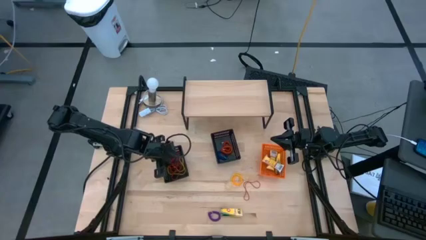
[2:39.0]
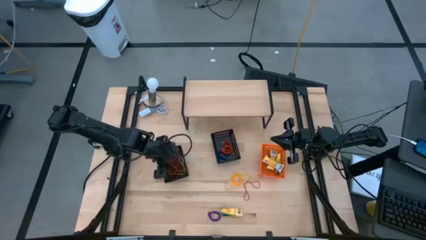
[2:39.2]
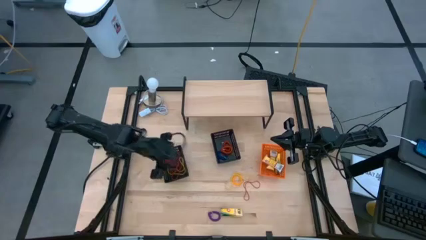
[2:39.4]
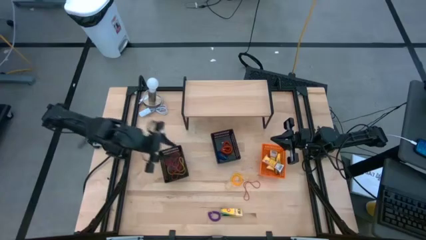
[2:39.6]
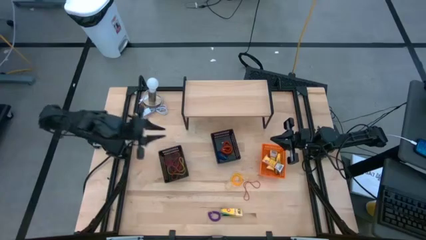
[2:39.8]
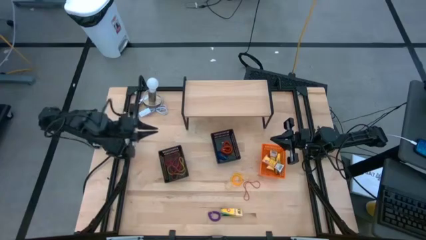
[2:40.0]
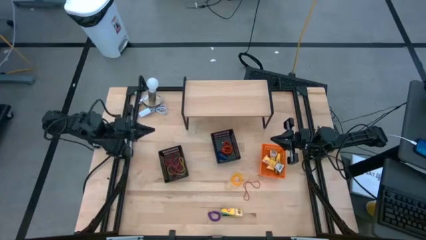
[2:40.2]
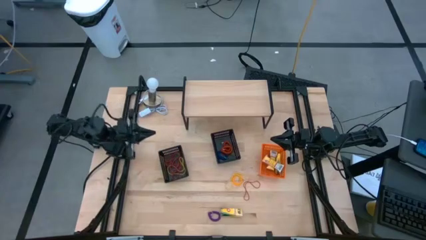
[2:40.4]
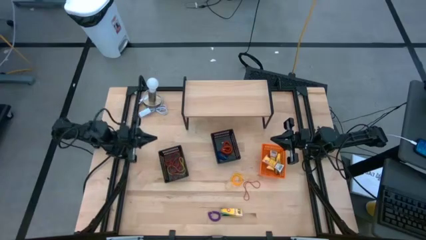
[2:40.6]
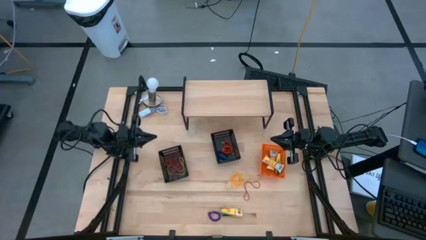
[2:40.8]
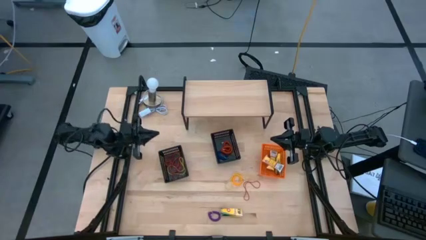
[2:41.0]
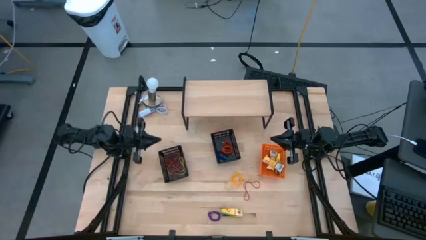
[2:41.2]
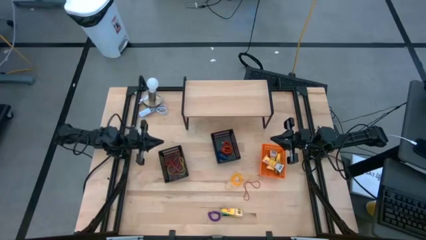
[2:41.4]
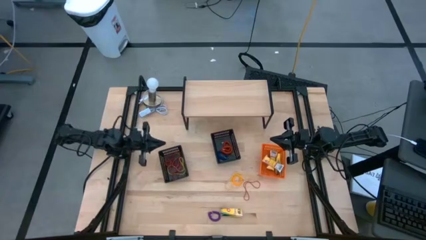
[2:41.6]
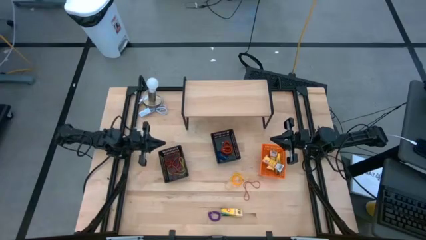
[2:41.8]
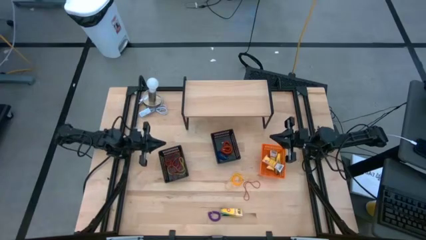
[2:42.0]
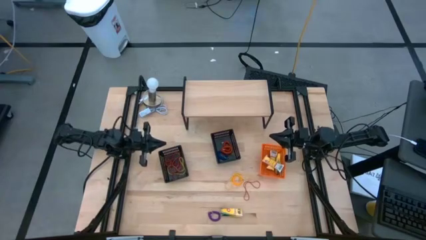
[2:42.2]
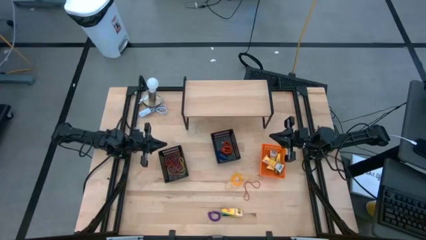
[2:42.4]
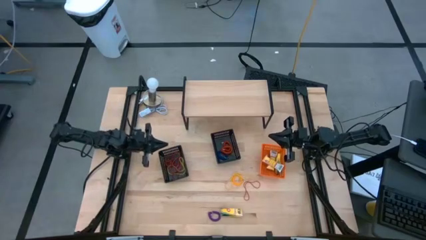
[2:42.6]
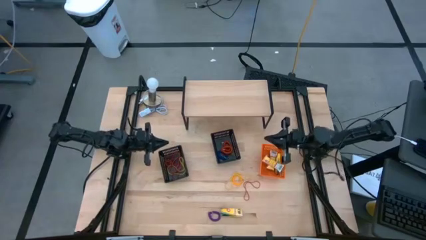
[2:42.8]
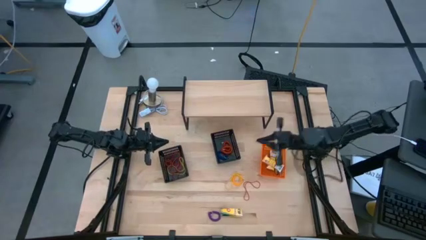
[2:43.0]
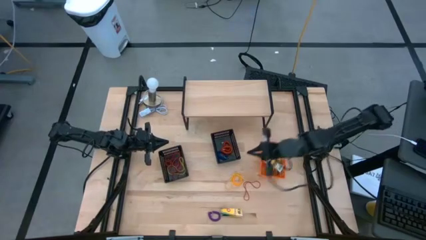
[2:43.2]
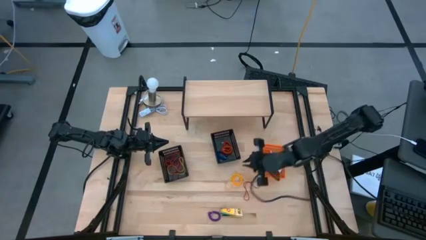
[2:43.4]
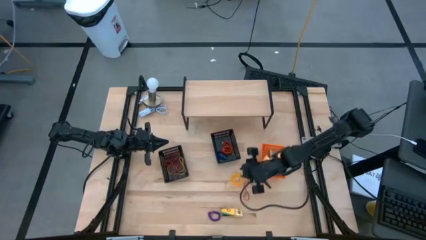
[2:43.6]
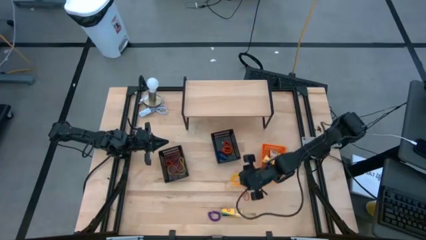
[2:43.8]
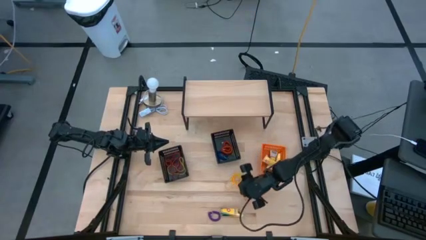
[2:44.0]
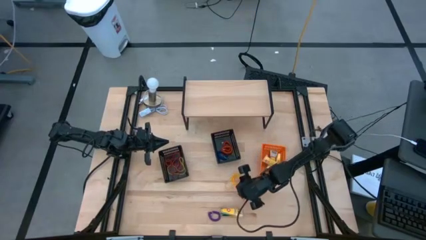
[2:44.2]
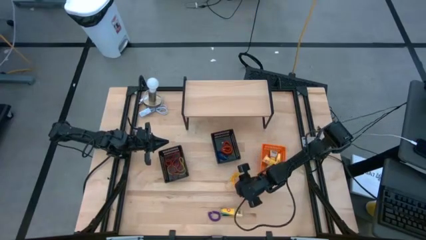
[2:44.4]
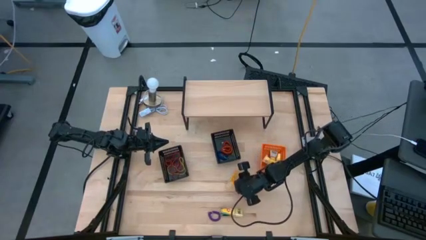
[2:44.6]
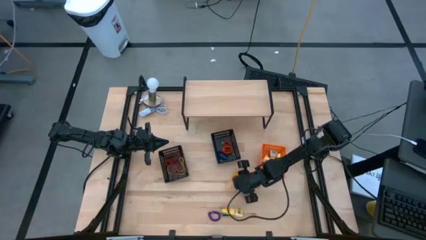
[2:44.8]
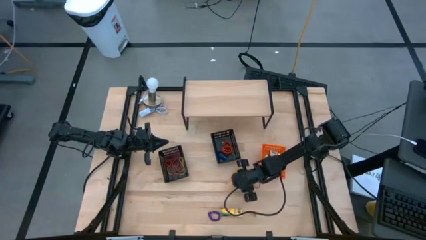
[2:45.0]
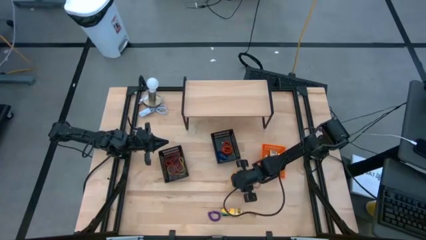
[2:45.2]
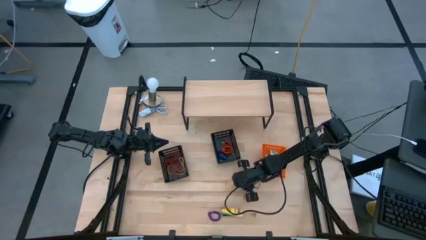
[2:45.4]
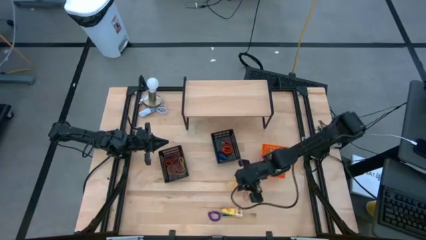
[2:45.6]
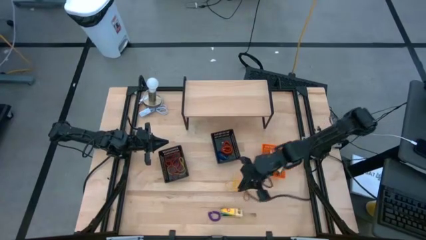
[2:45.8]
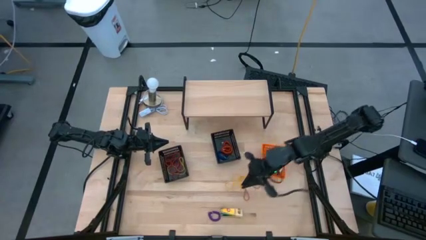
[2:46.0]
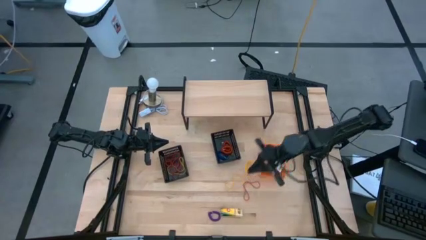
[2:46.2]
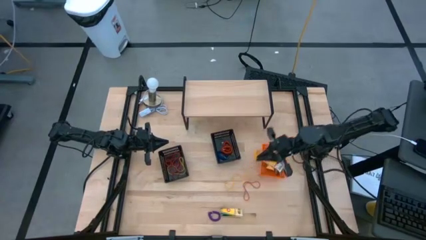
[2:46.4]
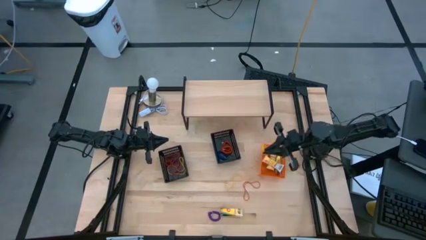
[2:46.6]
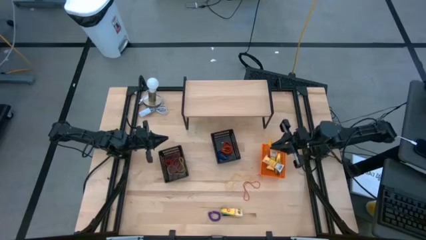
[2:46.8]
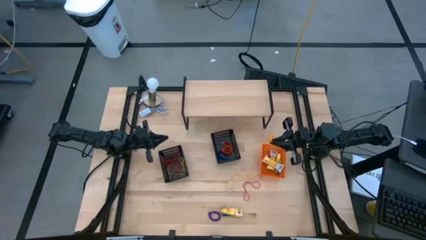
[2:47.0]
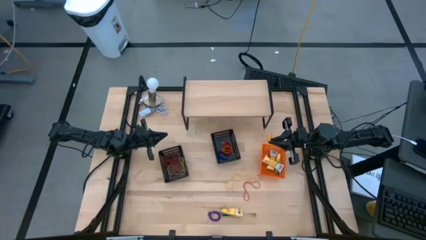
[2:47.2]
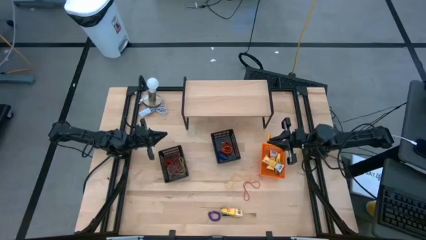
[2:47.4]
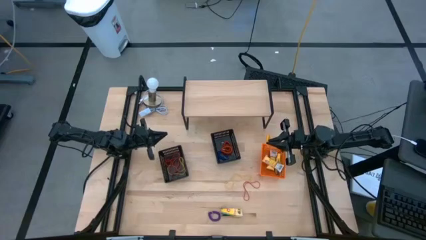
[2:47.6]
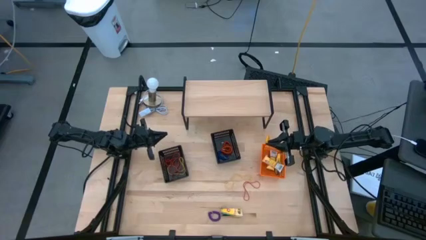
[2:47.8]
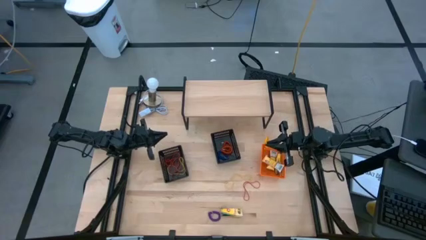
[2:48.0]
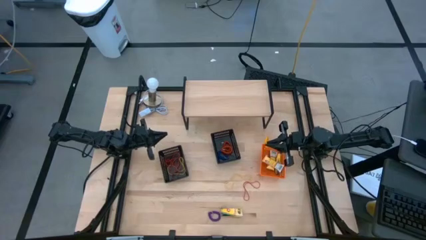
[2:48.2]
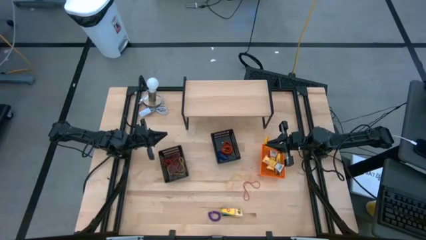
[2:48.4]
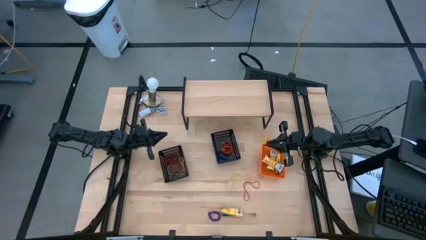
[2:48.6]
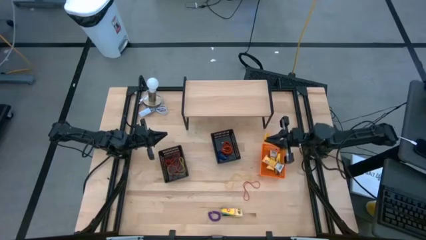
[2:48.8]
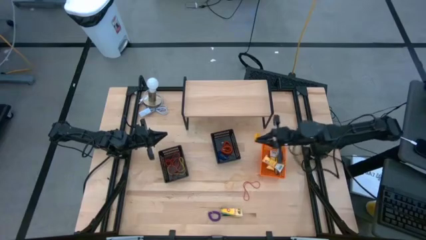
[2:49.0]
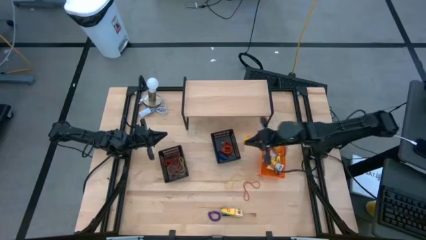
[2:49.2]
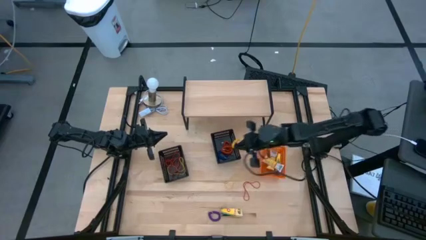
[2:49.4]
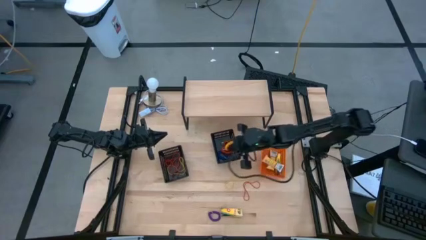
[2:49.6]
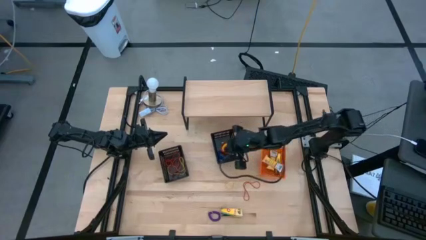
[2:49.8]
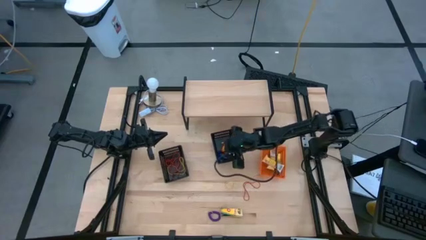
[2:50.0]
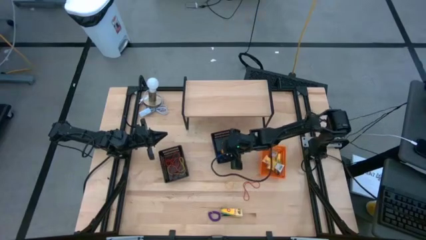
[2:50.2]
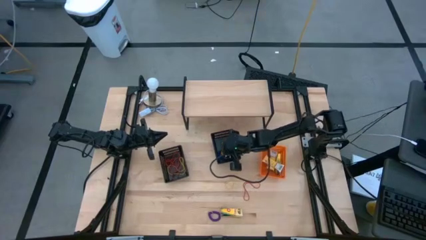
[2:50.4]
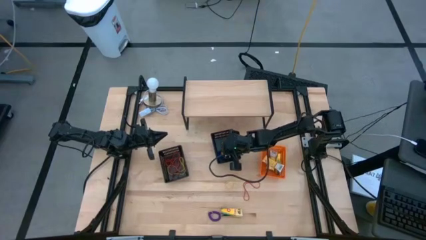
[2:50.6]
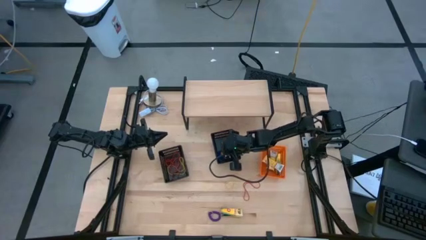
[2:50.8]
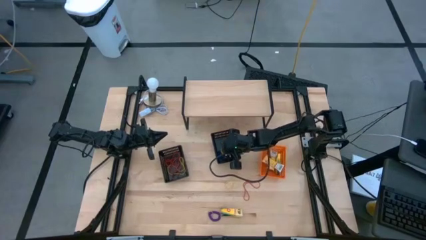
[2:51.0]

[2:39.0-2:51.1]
Task: Pick & Place Office Desk Supplies
Put the yellow spring rubberband into the right black
